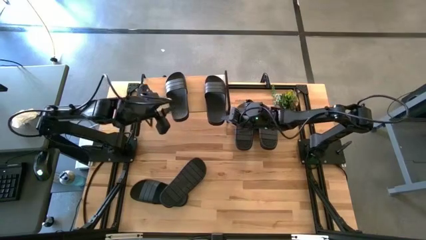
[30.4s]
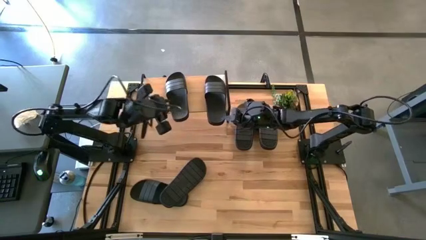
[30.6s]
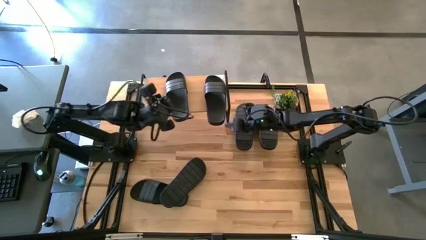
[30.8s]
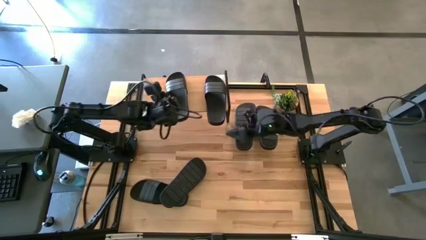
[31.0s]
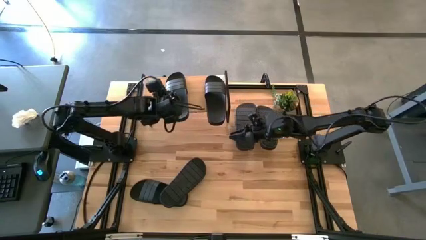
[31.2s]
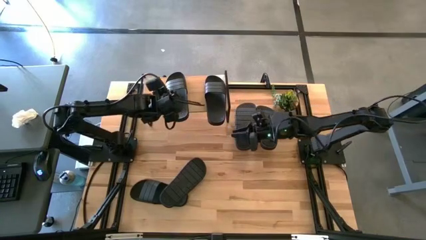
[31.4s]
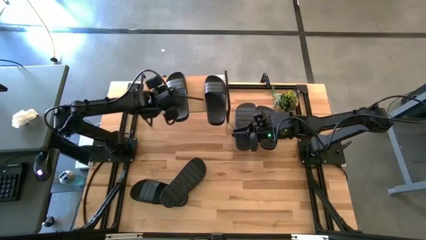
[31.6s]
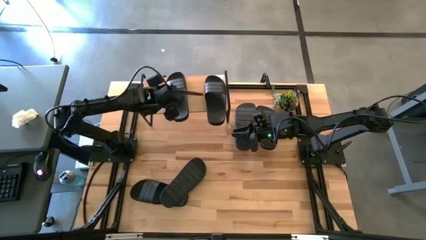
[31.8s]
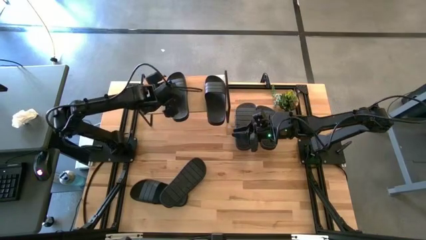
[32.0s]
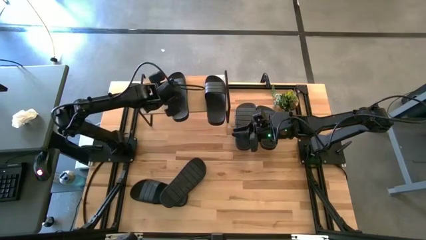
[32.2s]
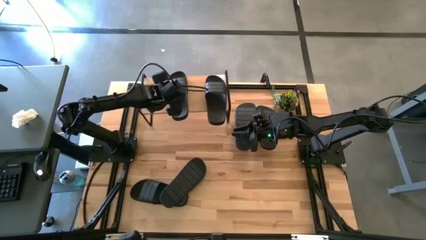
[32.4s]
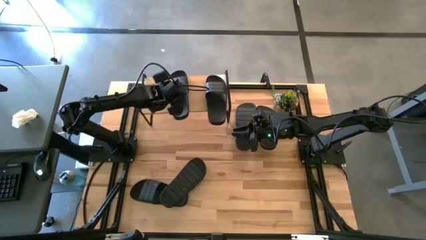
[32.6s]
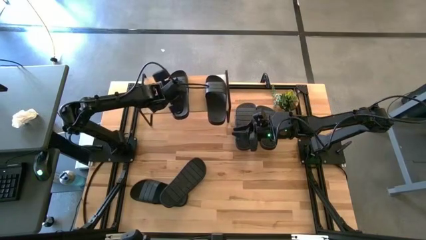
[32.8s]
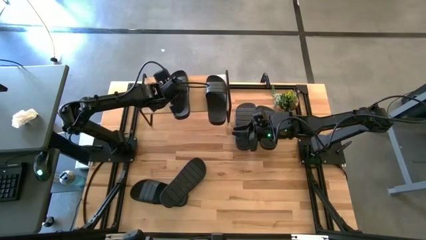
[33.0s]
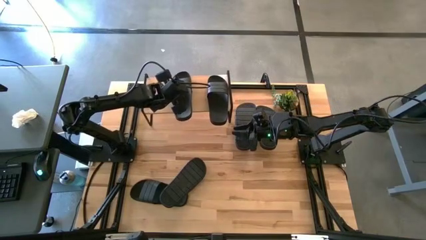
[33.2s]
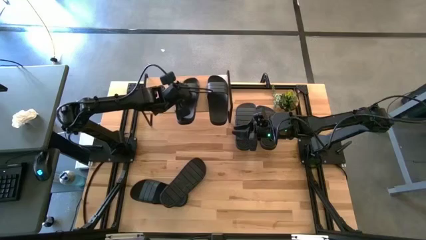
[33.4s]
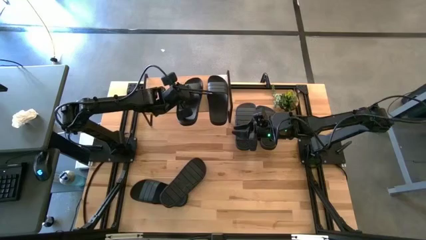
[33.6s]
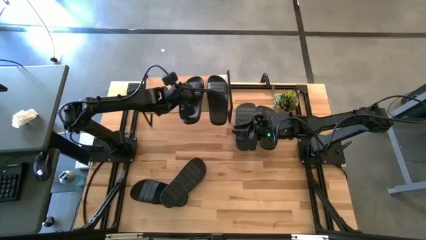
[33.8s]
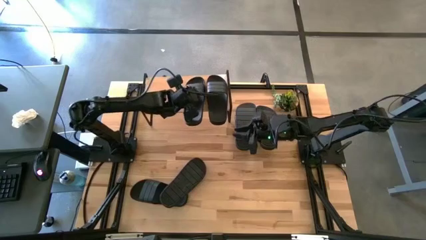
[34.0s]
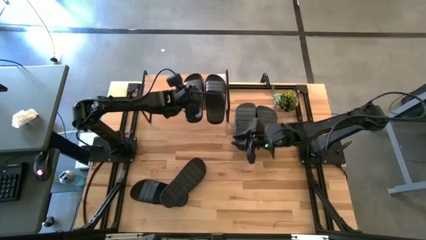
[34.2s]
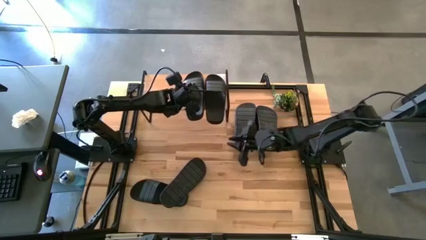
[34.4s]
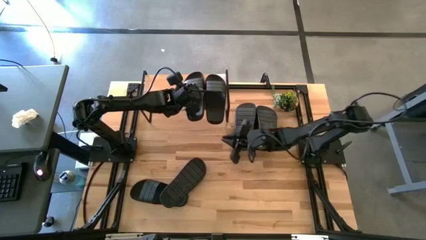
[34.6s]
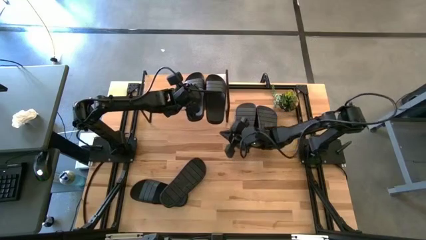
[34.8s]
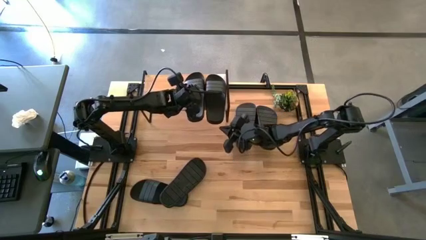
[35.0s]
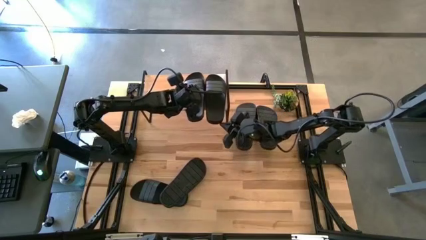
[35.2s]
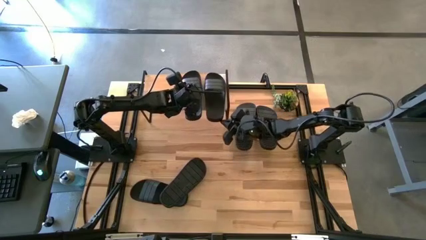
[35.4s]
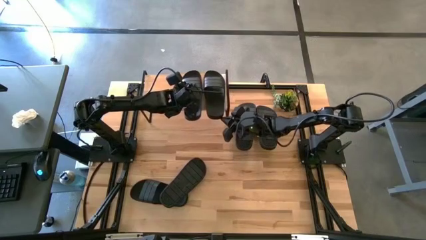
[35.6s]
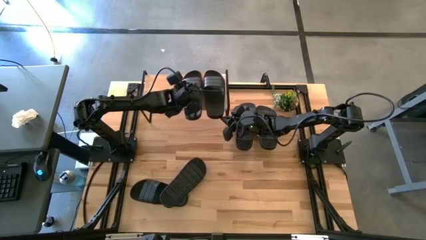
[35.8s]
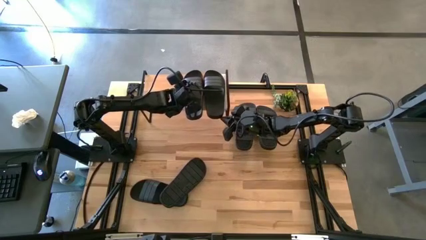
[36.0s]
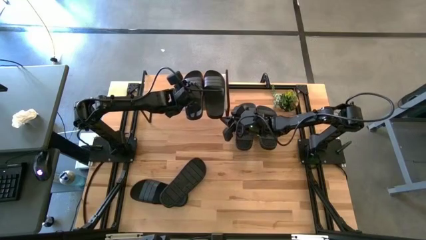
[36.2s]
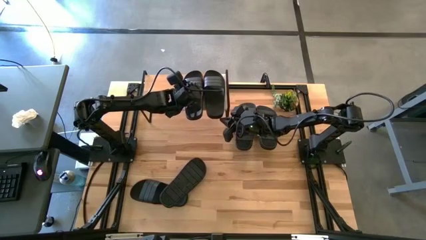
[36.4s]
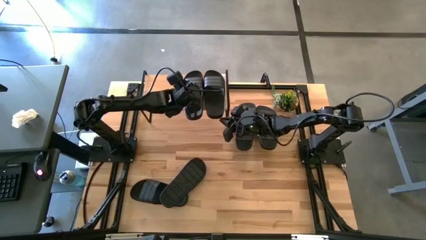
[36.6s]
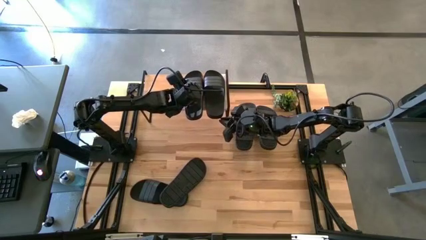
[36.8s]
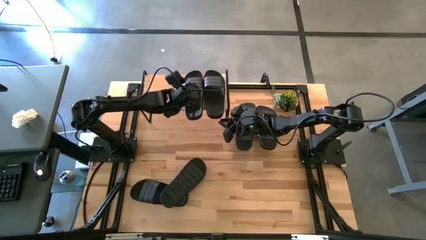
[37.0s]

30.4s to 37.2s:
Task: Pick and place slides into the shelf
Adjust the black slippers on the shelf

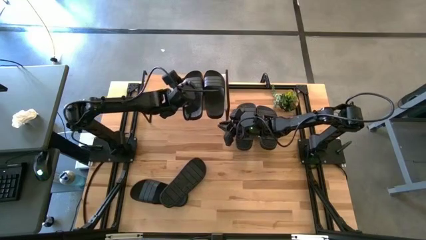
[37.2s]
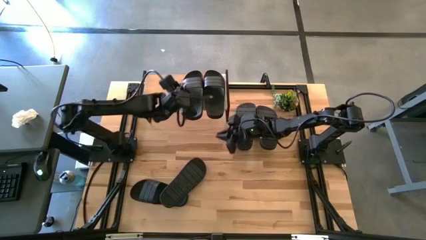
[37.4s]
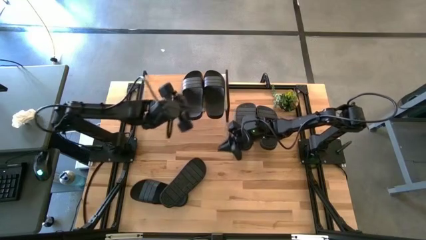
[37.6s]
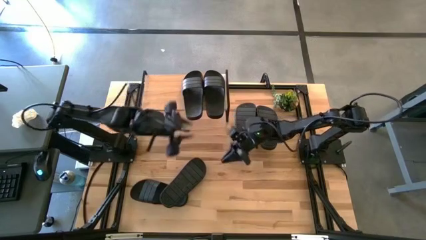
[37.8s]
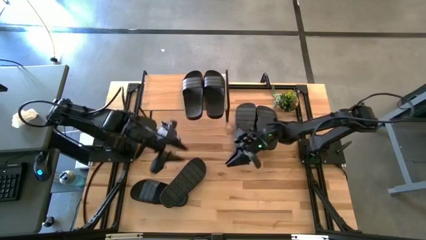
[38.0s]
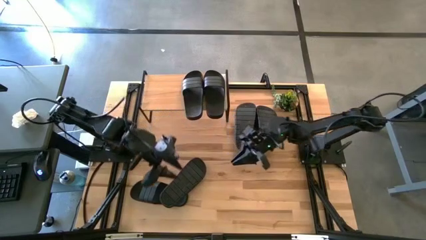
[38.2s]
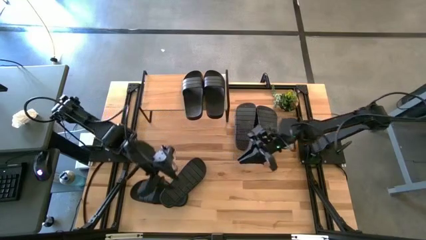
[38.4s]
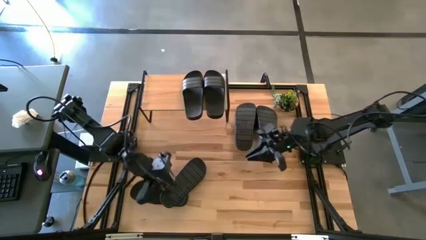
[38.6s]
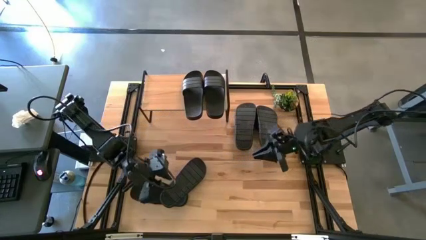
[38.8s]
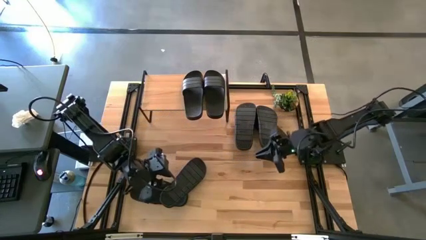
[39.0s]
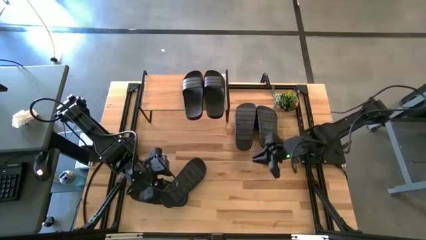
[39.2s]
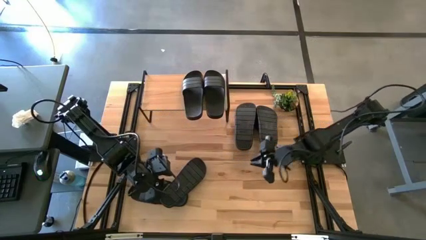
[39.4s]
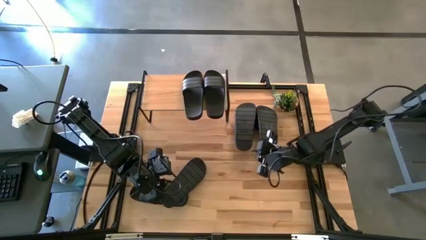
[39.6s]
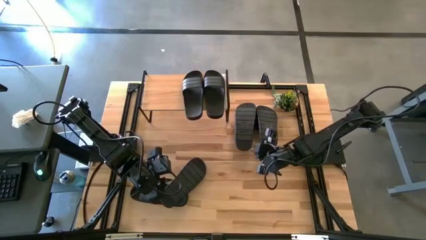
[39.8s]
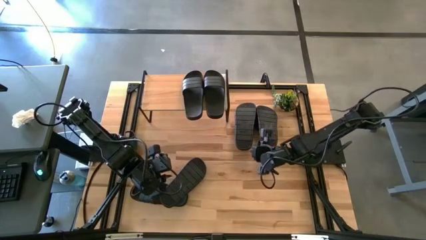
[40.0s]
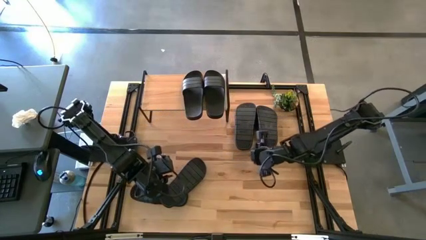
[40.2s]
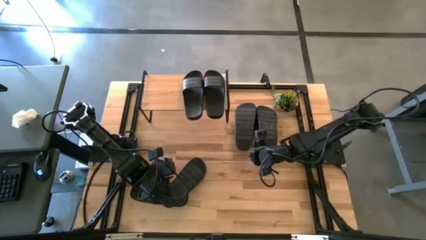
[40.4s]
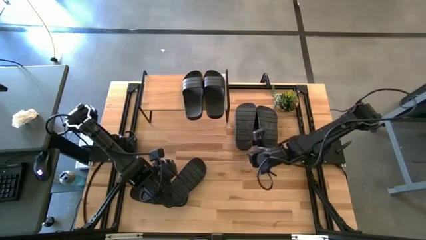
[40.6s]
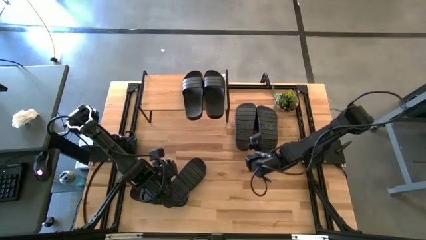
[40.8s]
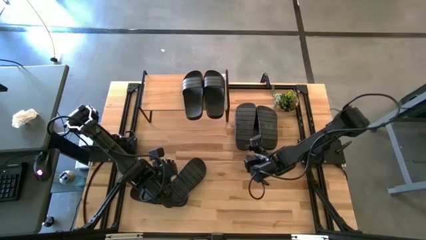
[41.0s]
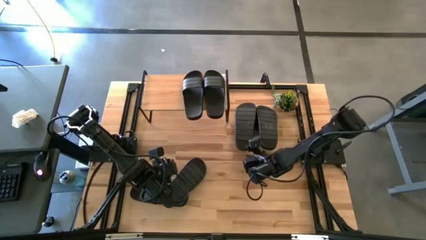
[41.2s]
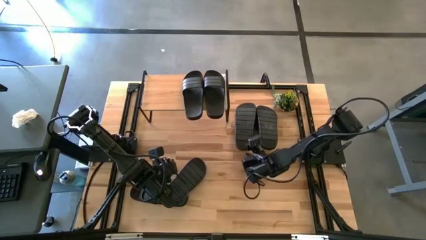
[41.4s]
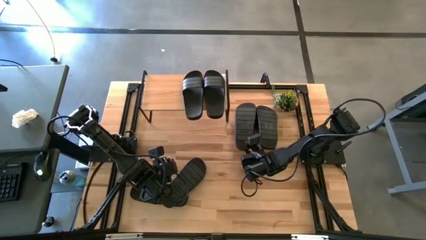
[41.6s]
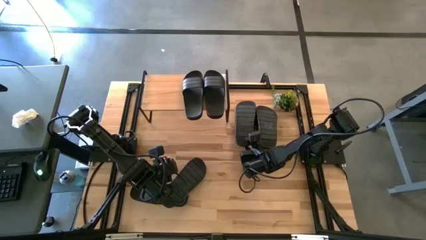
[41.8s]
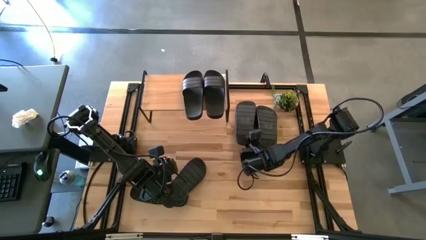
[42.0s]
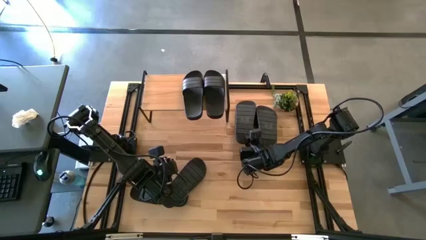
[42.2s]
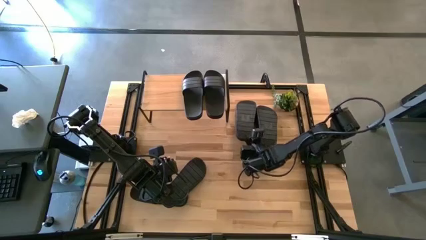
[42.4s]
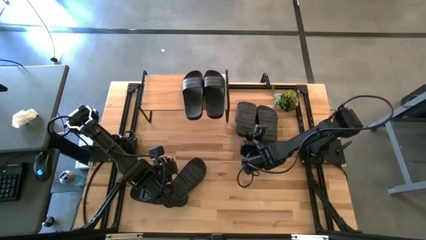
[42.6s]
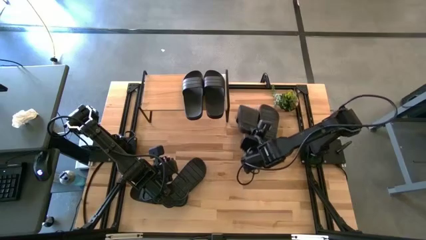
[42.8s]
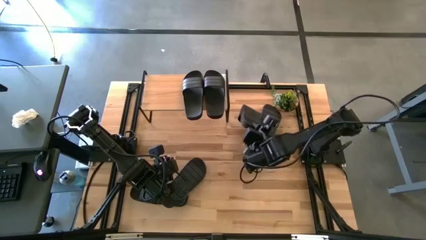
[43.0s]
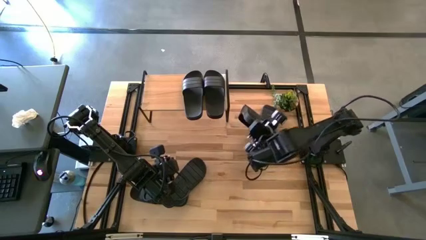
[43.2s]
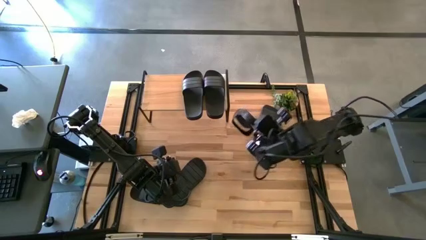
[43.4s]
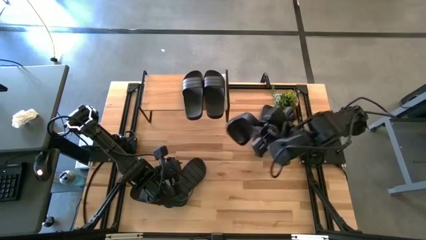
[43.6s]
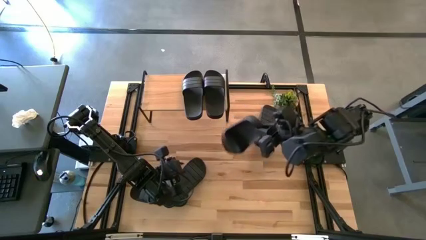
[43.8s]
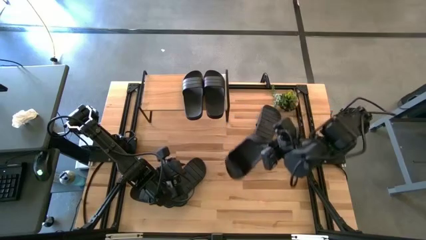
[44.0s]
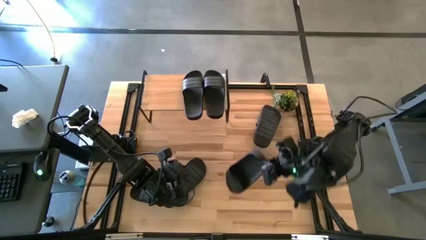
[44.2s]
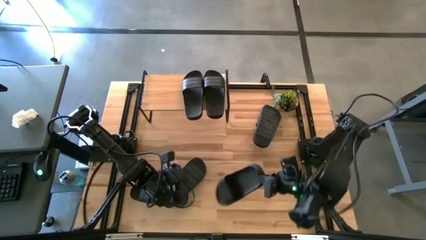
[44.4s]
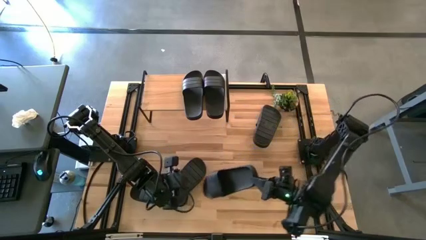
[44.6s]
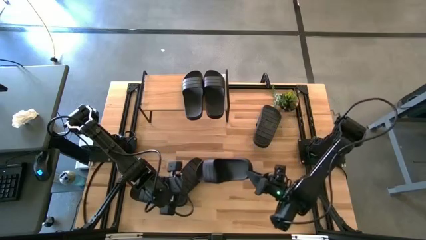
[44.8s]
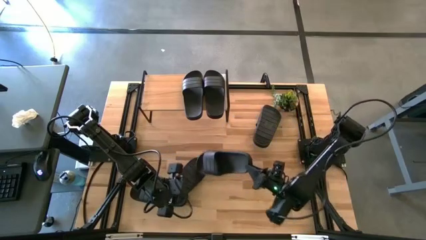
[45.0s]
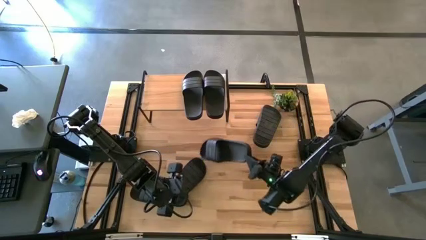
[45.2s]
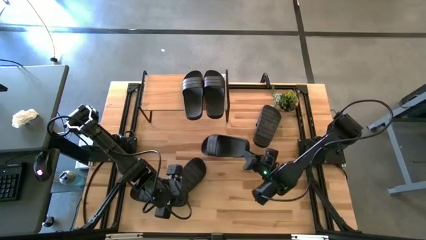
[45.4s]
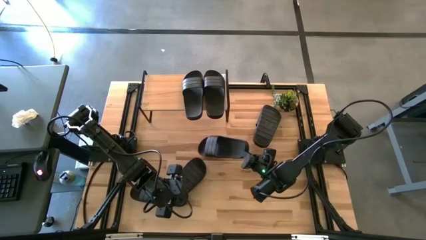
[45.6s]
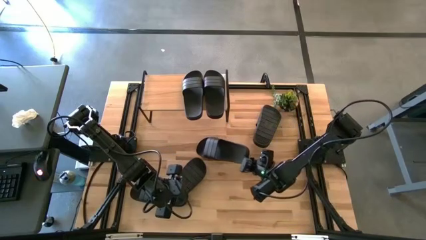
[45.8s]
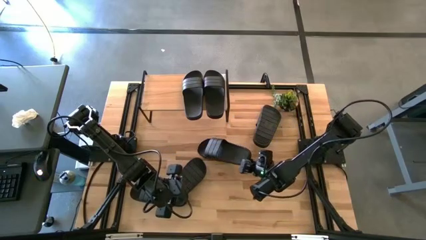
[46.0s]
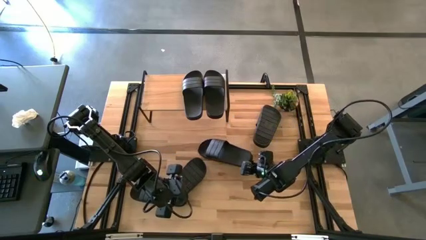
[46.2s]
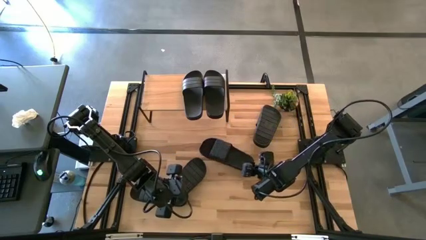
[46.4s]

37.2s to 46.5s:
Move the black slipper to the center of the table

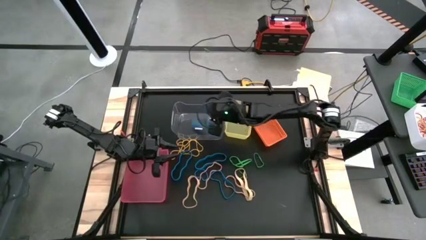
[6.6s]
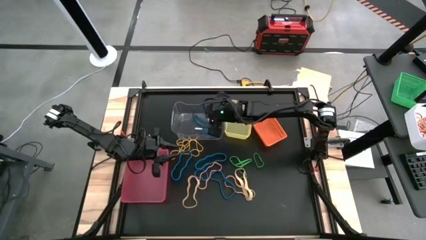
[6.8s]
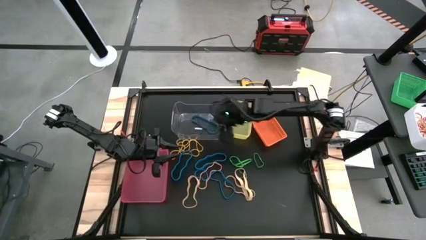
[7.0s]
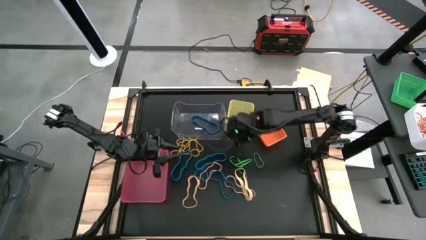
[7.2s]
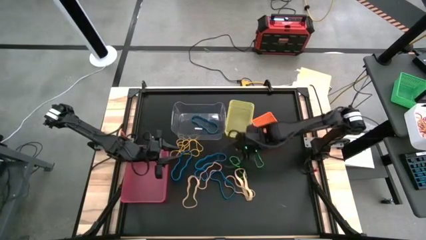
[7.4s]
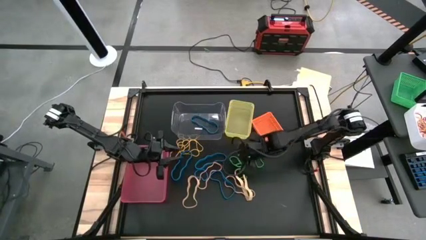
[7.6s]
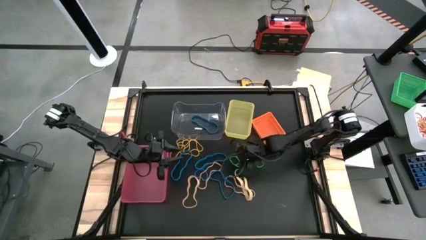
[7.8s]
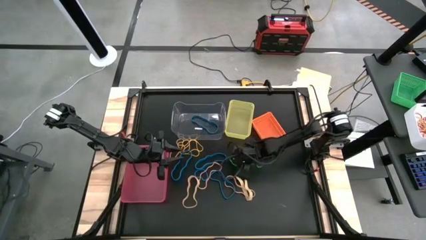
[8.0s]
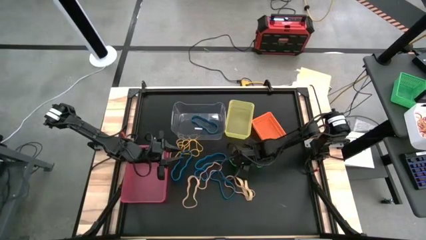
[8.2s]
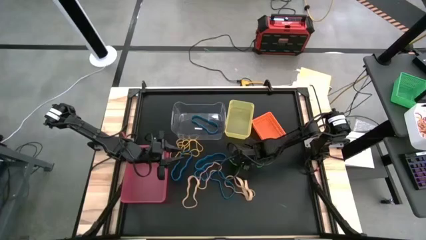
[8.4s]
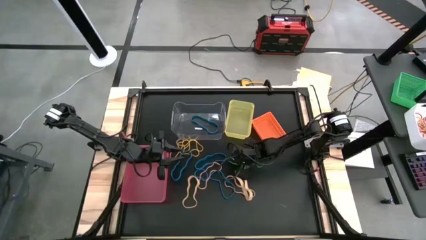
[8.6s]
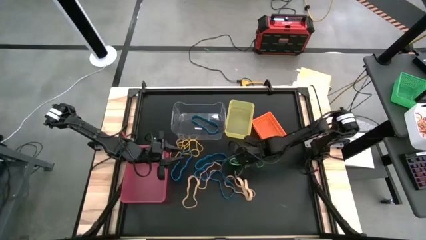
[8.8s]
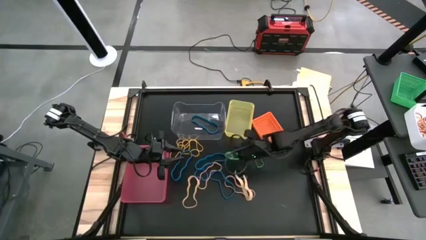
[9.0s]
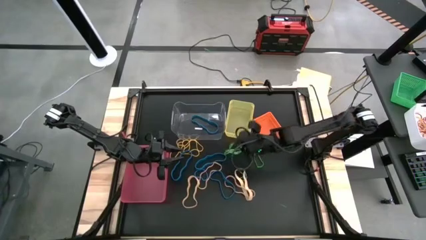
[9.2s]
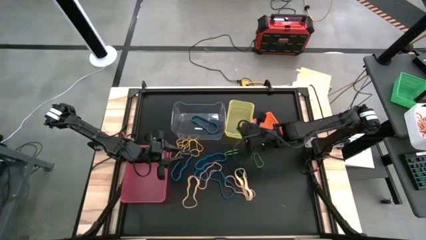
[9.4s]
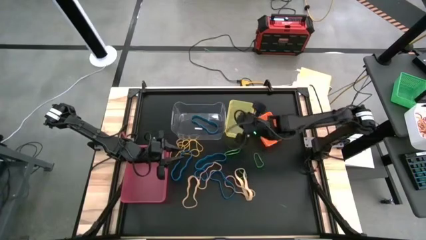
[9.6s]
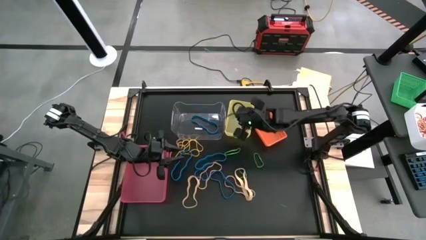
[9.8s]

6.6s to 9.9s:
Task: Sort rubber bands into baskets
Put the green rubber band into the yellow bin
